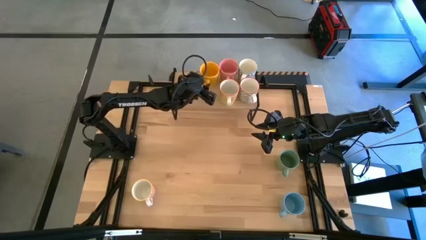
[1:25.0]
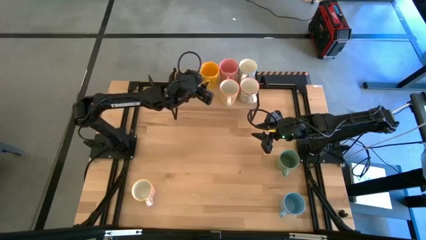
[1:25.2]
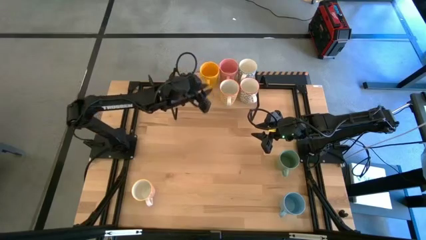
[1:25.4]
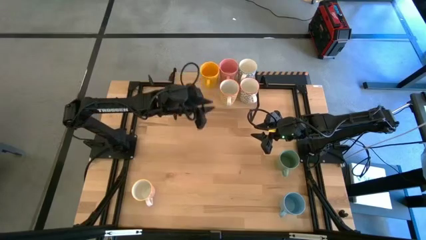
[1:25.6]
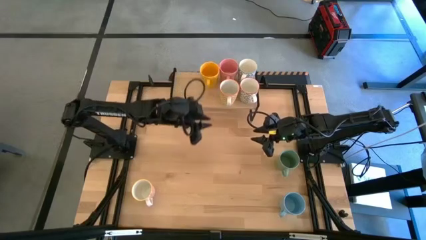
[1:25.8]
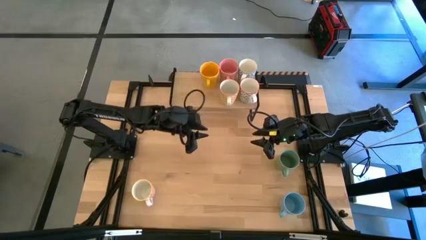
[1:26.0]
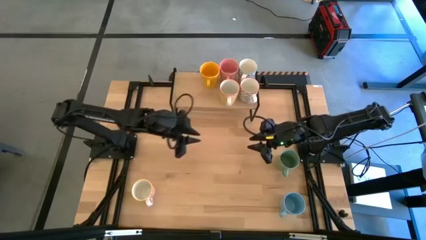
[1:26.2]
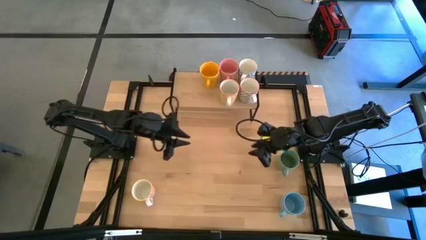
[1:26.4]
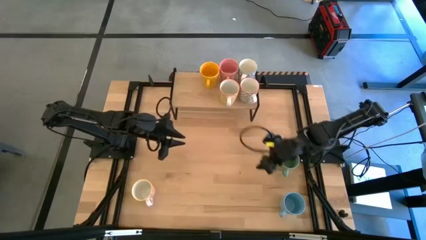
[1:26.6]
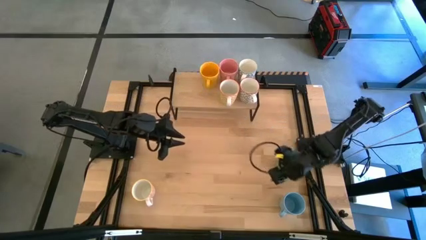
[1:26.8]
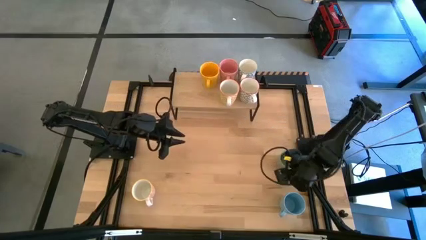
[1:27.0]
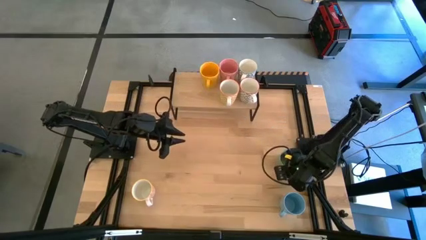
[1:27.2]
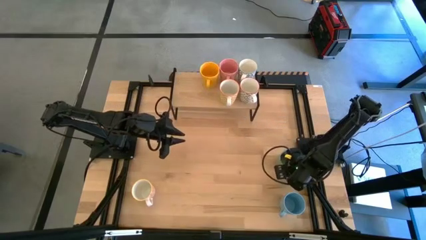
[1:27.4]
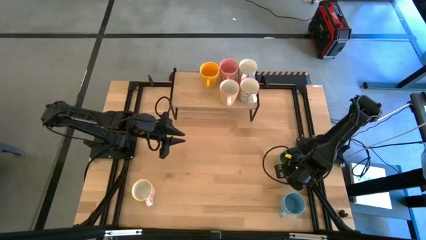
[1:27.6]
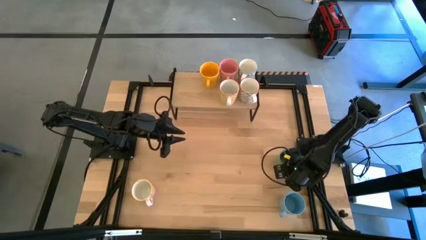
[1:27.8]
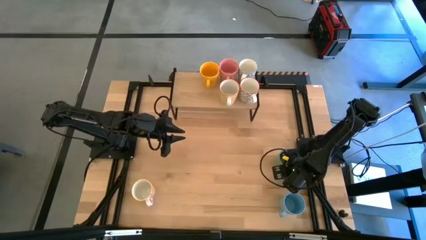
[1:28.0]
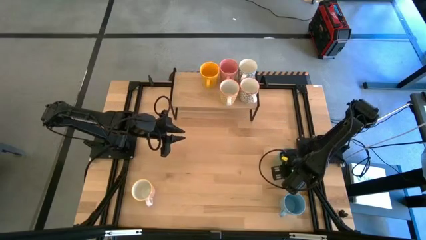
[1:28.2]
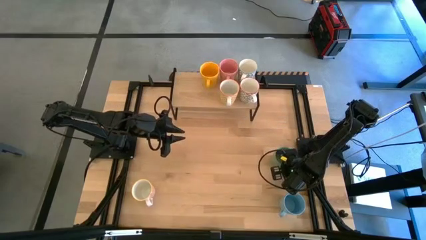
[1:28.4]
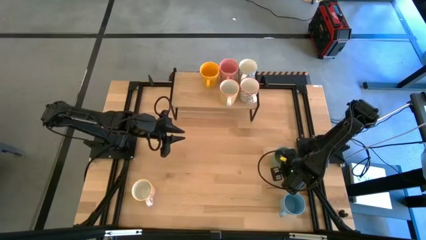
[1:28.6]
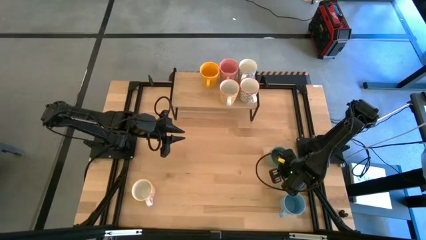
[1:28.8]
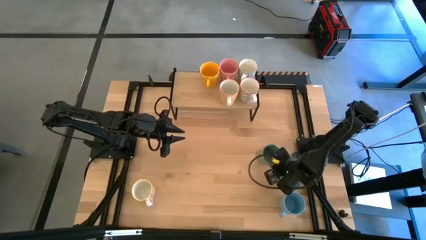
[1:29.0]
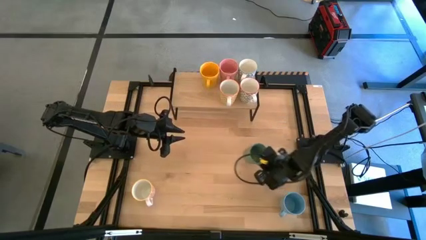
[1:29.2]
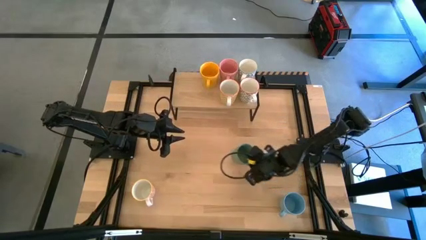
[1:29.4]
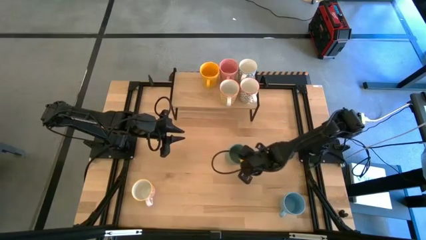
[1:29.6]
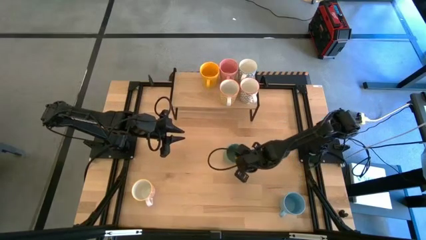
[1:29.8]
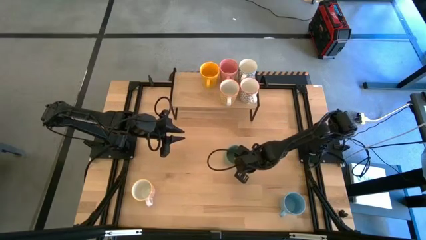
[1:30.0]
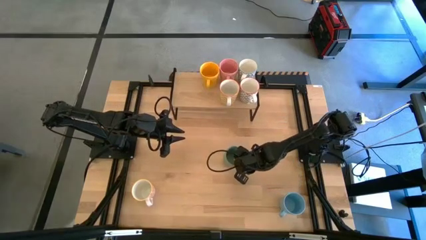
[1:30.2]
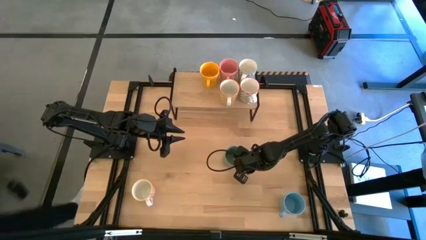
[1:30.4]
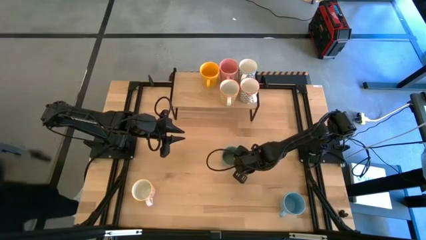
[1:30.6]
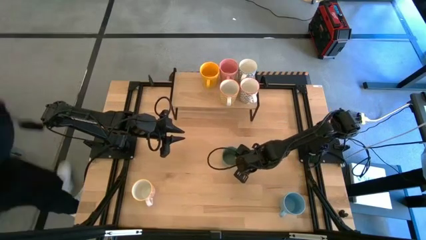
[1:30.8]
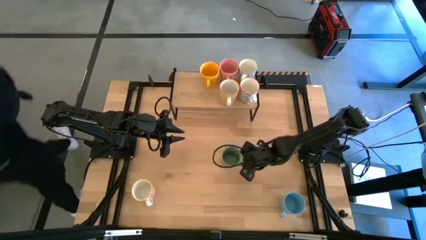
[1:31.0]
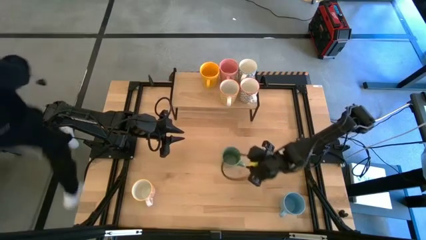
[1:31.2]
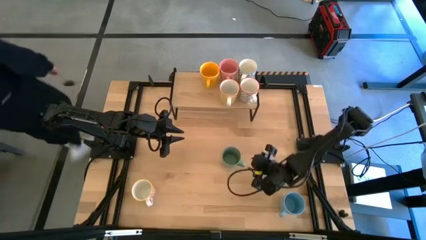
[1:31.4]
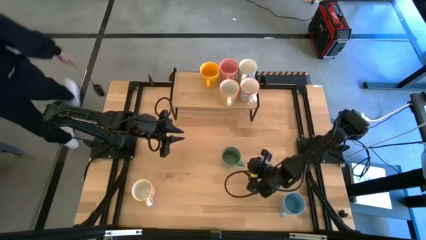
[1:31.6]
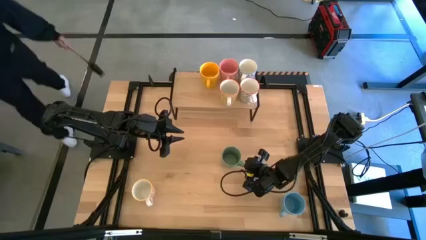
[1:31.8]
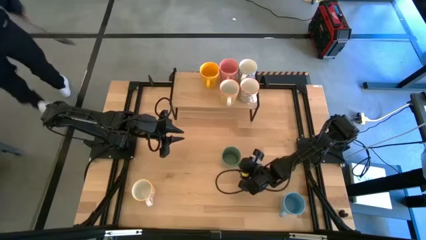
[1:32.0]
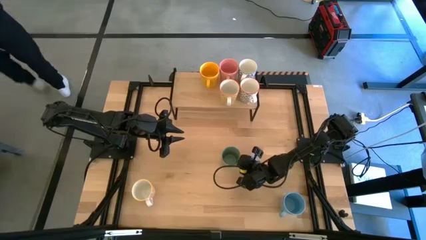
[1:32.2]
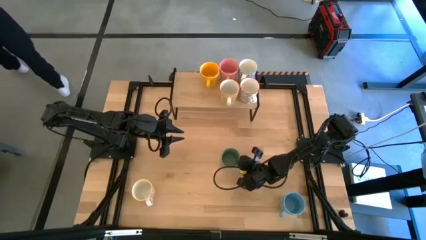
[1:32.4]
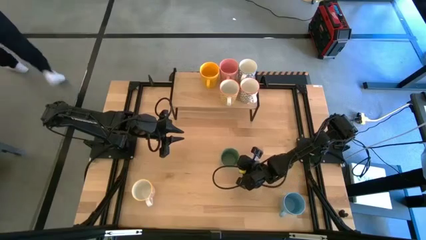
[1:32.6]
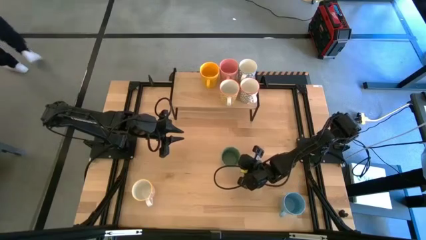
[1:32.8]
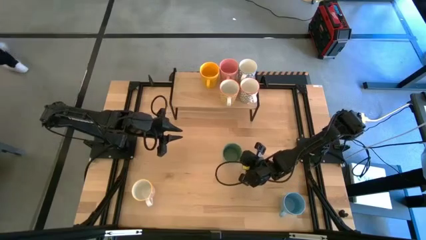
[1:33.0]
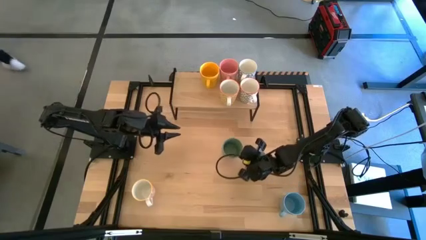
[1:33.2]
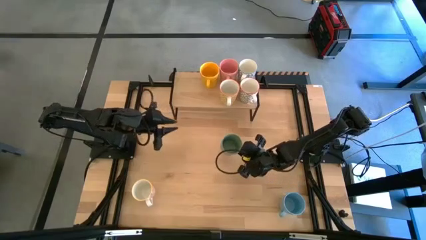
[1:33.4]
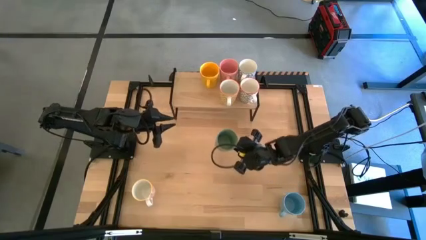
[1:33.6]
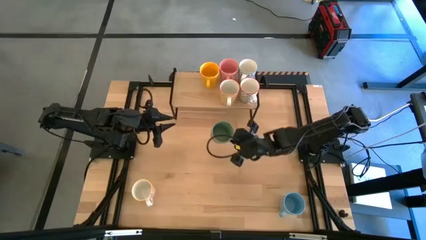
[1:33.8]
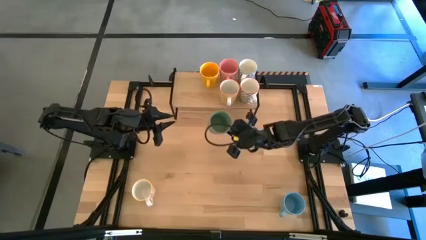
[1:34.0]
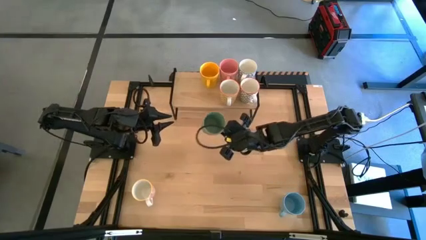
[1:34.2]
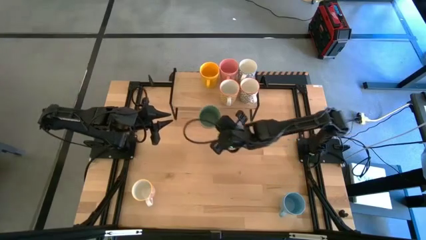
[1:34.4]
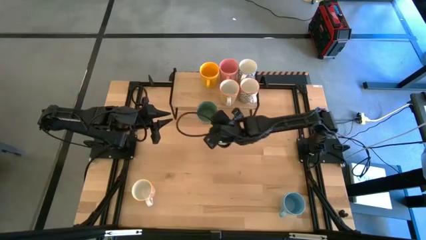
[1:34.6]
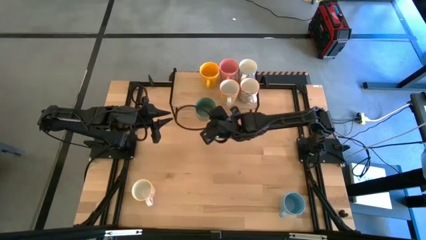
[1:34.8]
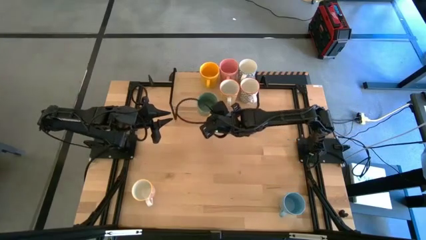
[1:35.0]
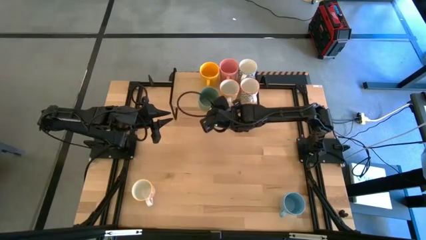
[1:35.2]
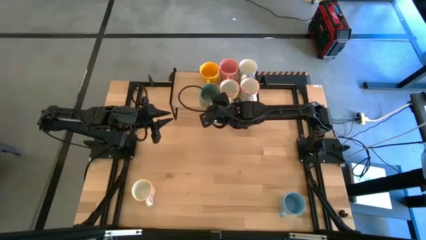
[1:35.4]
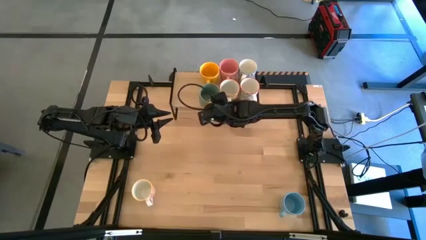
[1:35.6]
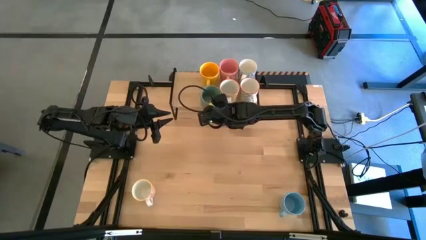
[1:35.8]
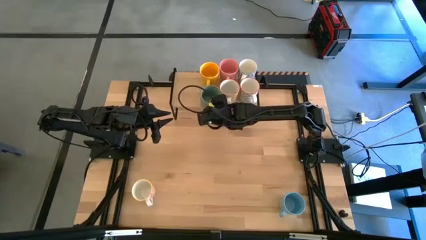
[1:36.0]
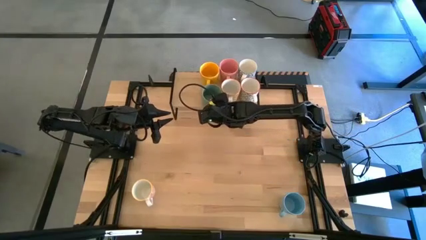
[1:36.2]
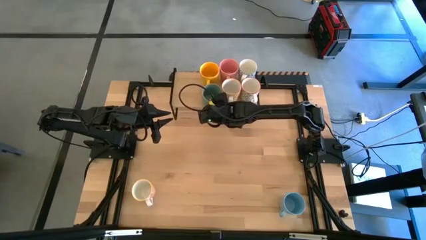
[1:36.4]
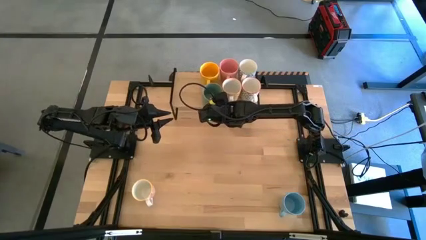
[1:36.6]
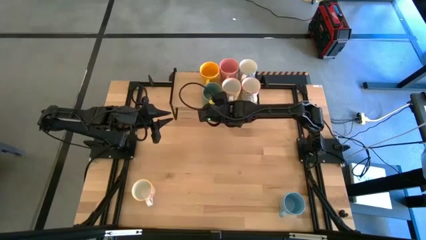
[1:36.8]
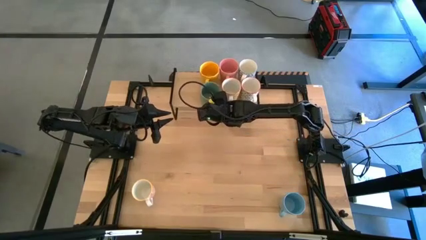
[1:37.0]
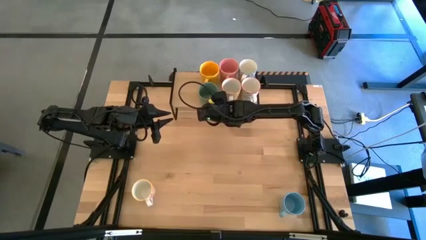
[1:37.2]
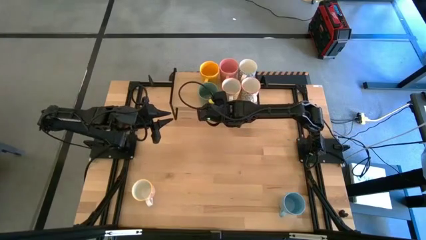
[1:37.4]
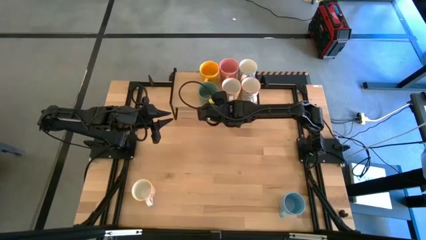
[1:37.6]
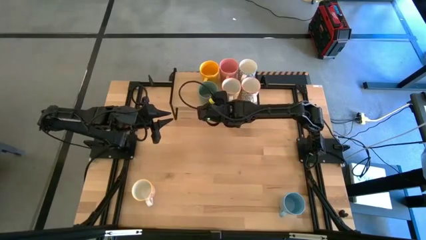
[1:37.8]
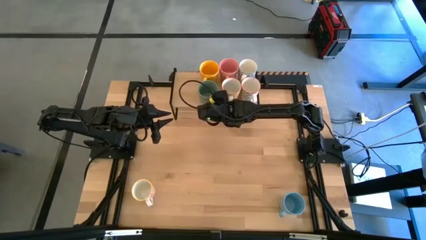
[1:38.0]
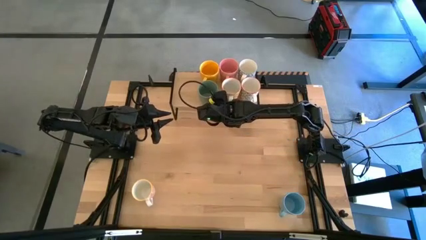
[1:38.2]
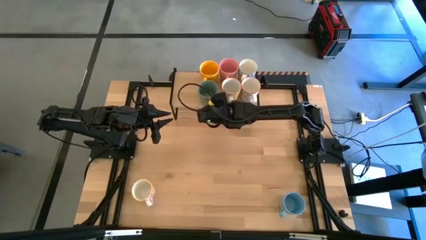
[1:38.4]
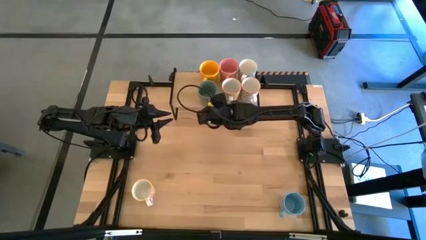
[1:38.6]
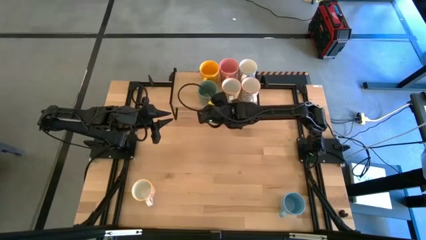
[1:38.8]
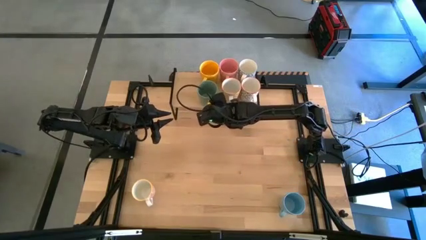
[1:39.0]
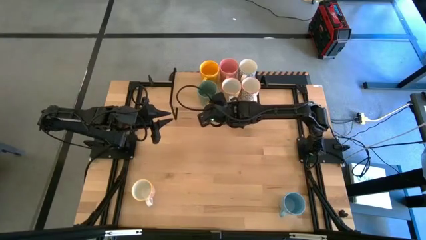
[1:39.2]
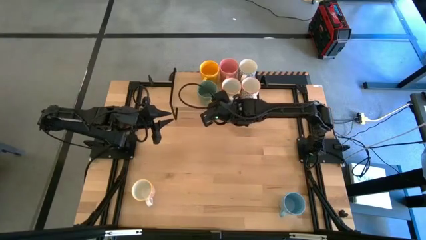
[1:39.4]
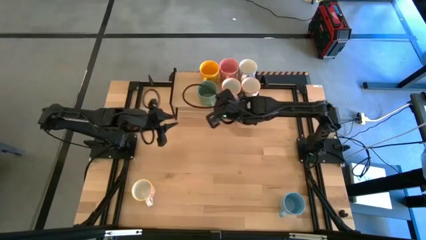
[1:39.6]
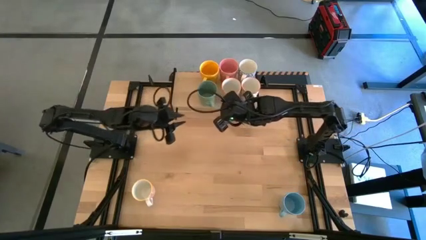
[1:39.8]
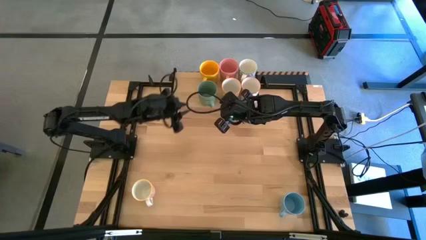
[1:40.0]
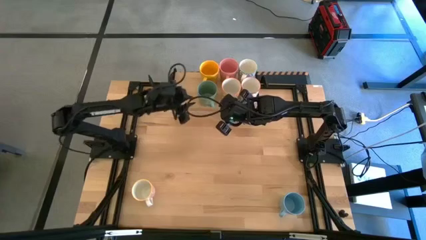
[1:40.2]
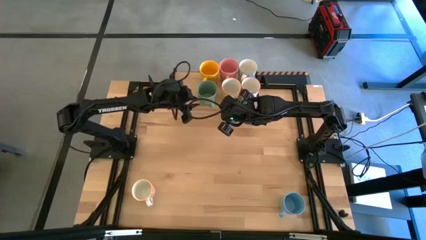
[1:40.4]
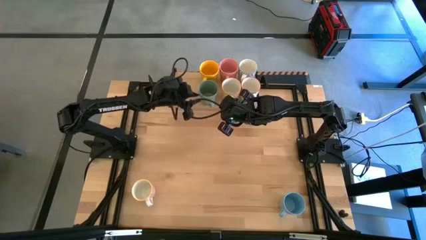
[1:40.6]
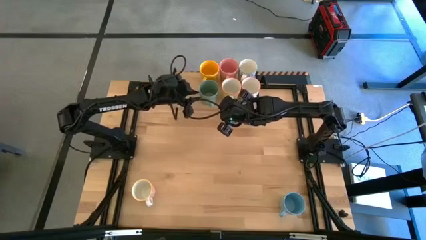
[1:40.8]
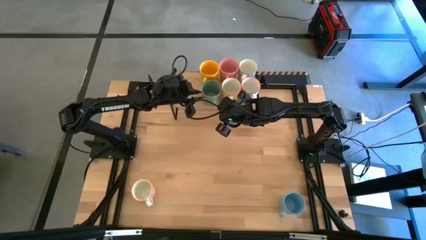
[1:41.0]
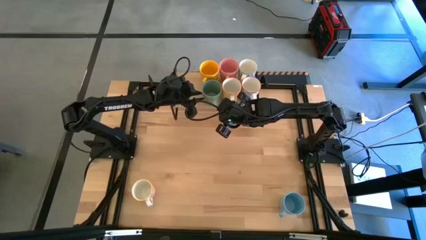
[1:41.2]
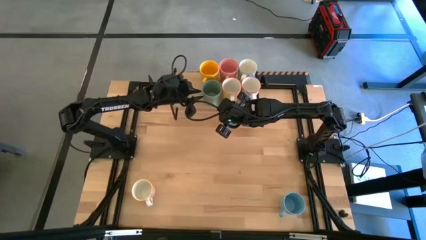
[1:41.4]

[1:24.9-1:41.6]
Task: Place coffee mugs
Put the green mug on the shelf

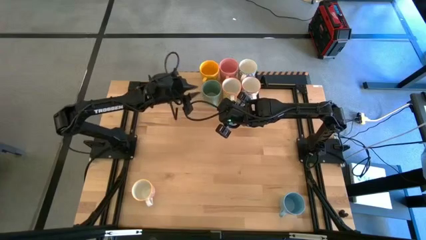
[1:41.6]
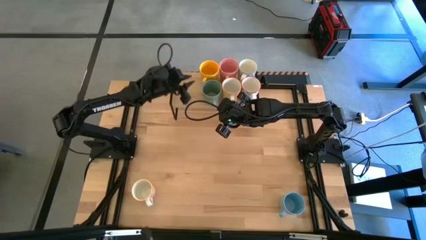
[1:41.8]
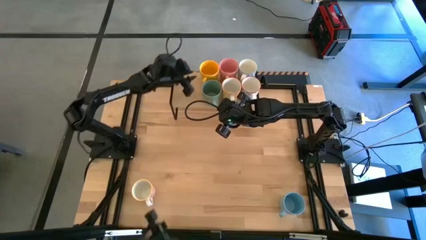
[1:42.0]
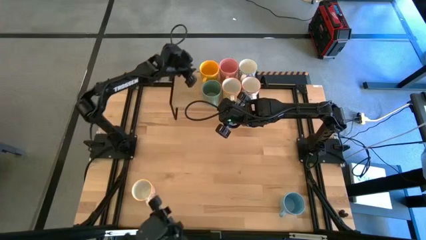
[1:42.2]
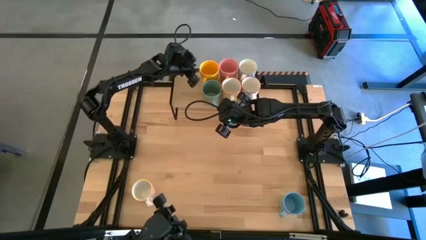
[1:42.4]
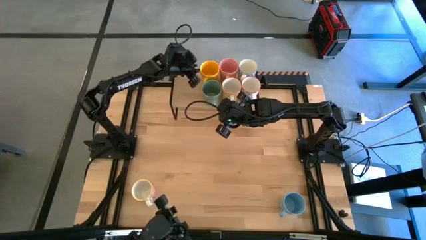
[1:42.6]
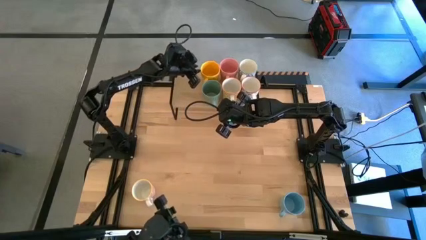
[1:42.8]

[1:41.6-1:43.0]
Adjust the yellow mug on the shelf
